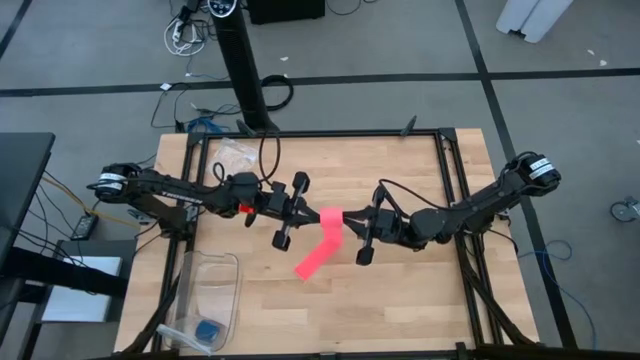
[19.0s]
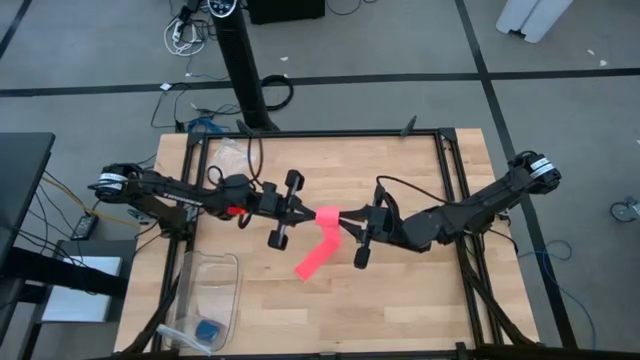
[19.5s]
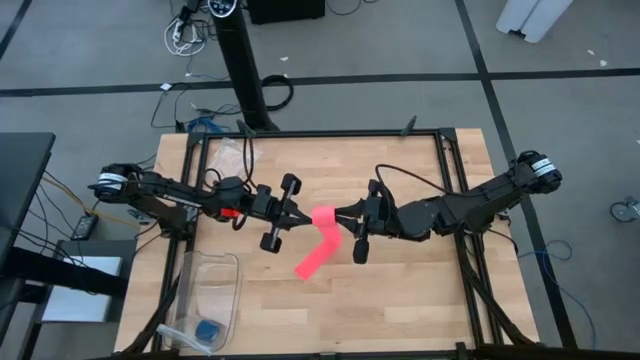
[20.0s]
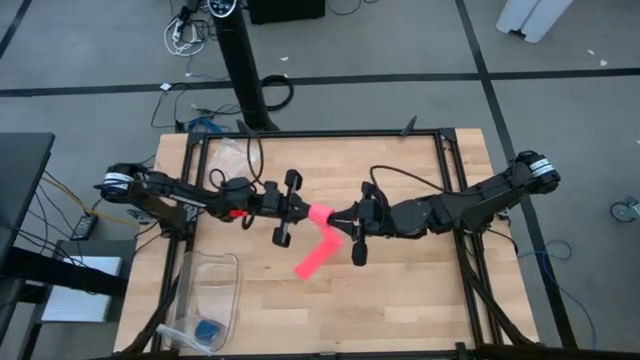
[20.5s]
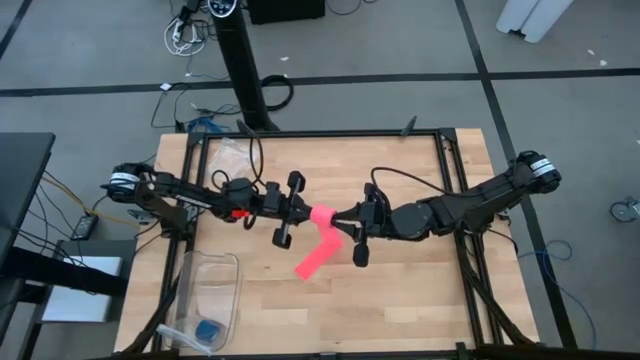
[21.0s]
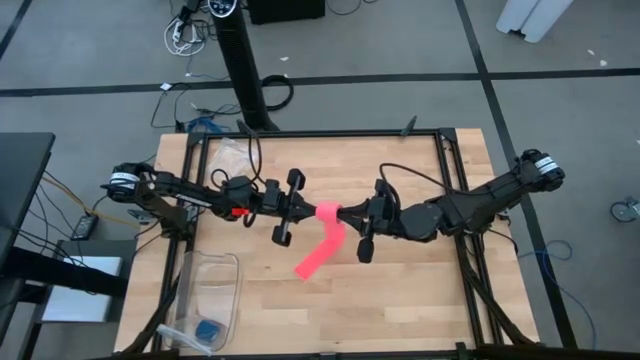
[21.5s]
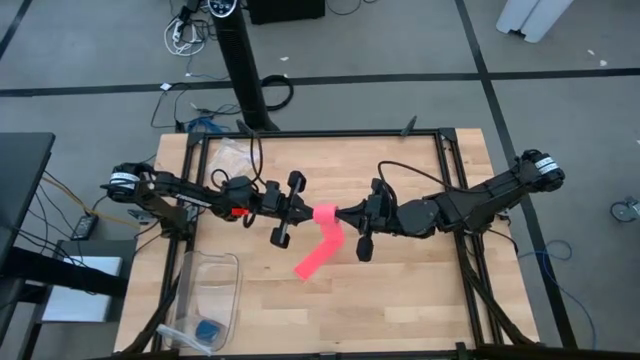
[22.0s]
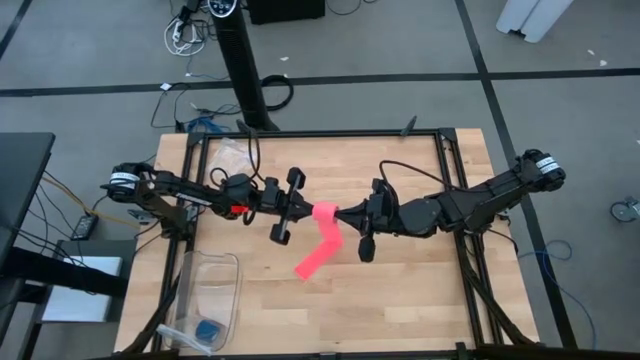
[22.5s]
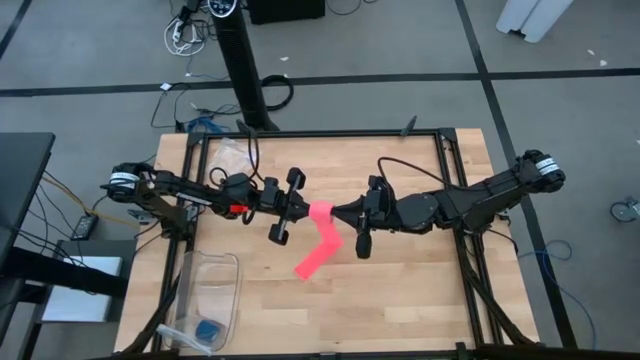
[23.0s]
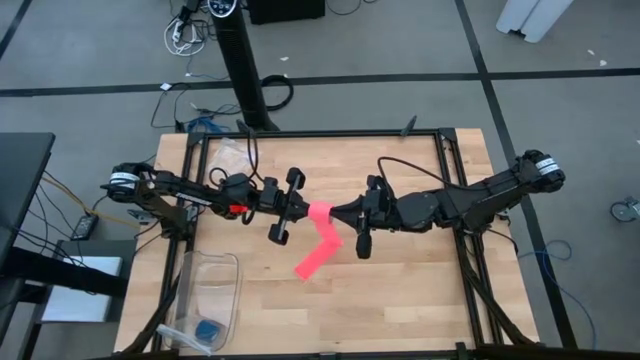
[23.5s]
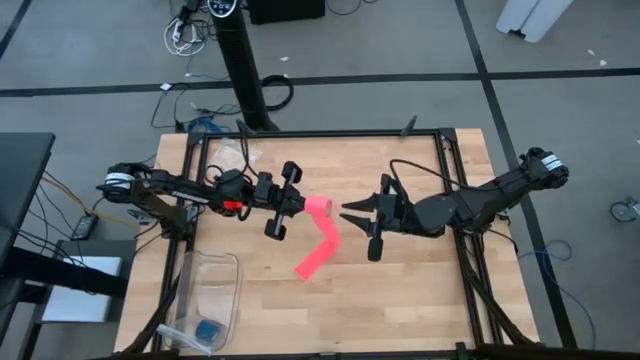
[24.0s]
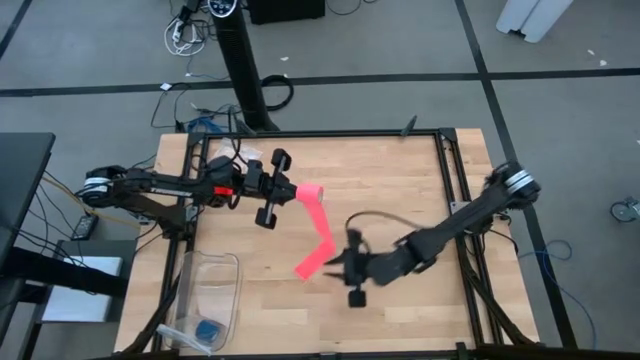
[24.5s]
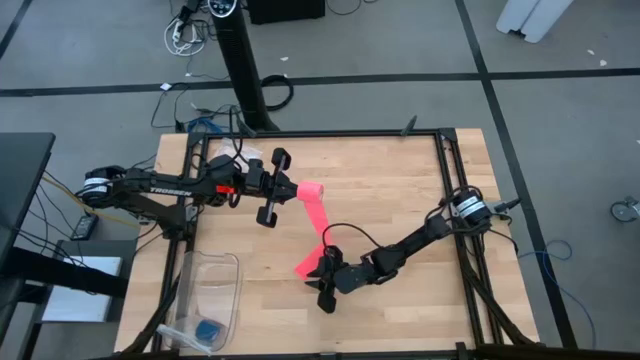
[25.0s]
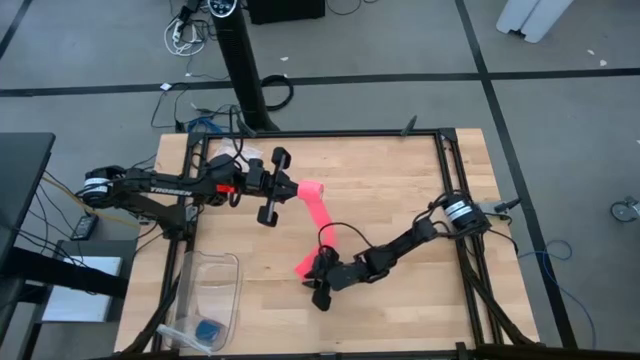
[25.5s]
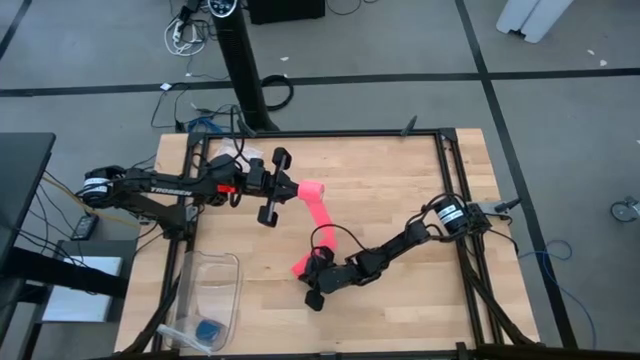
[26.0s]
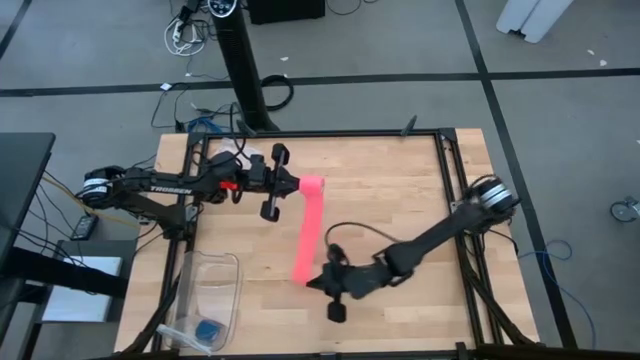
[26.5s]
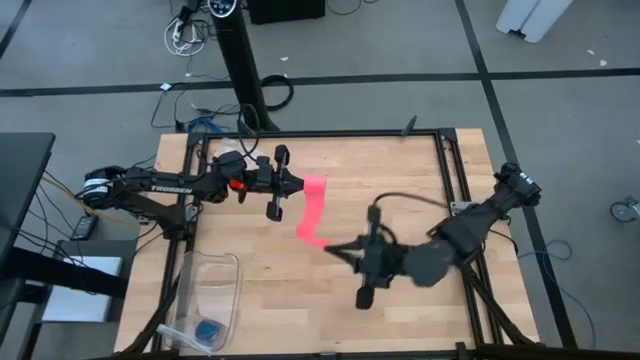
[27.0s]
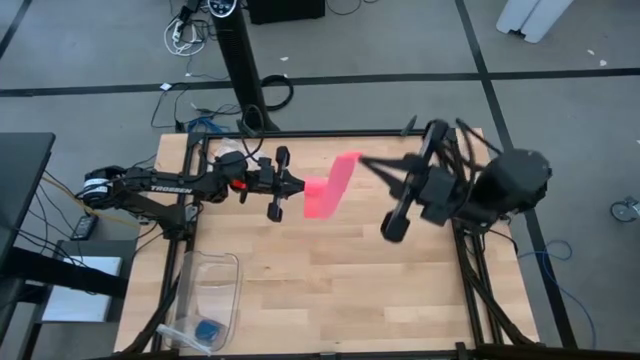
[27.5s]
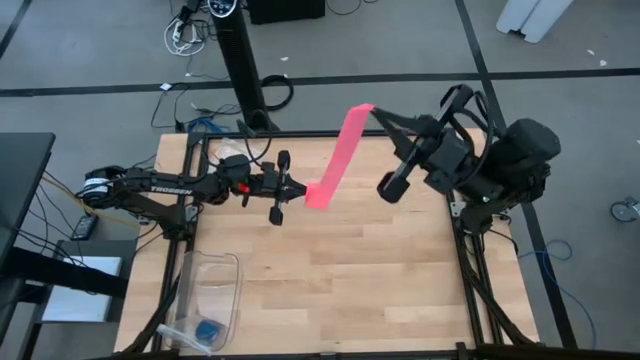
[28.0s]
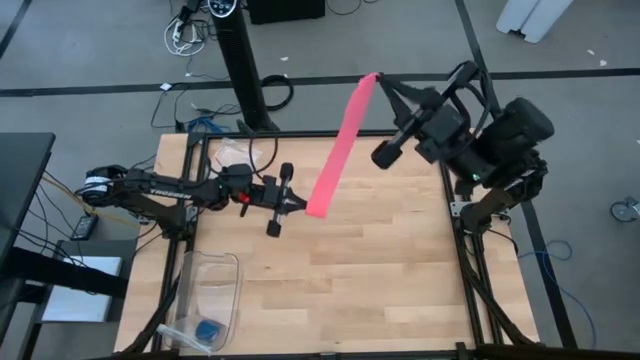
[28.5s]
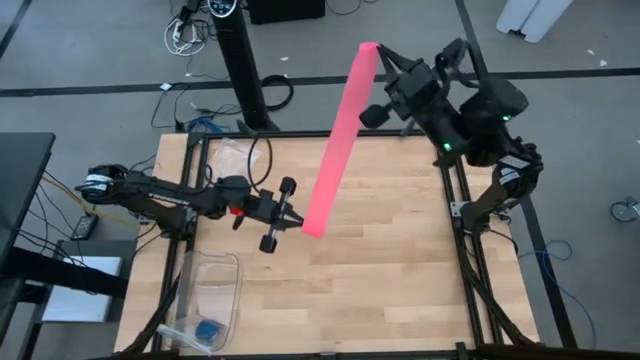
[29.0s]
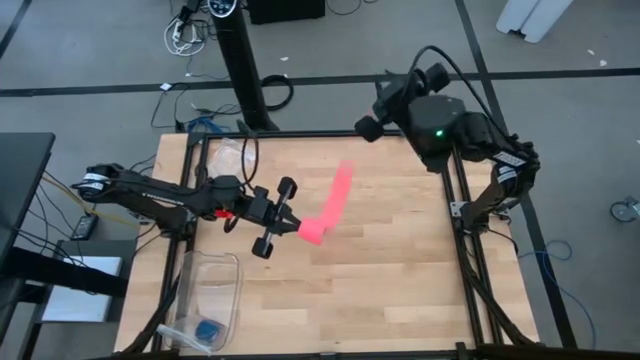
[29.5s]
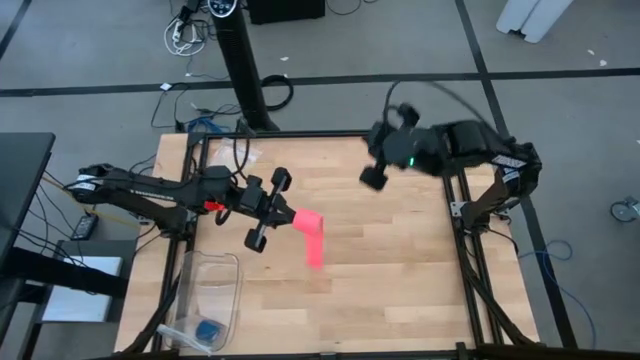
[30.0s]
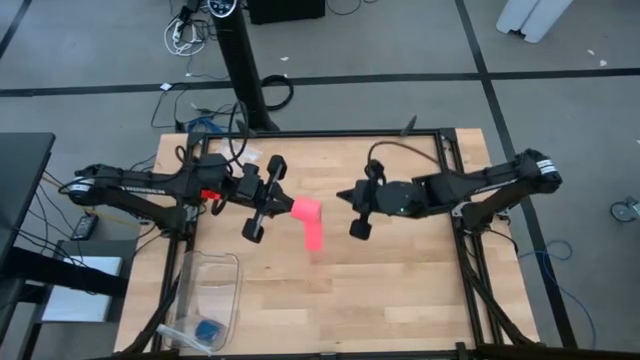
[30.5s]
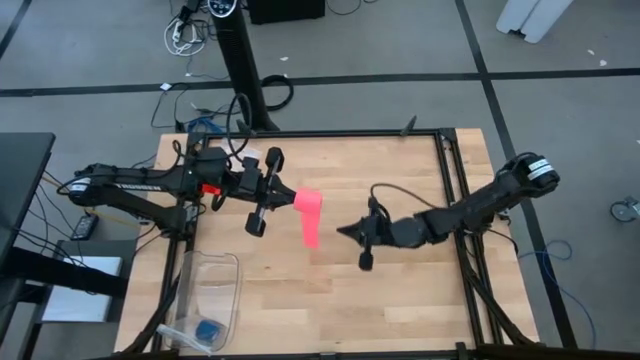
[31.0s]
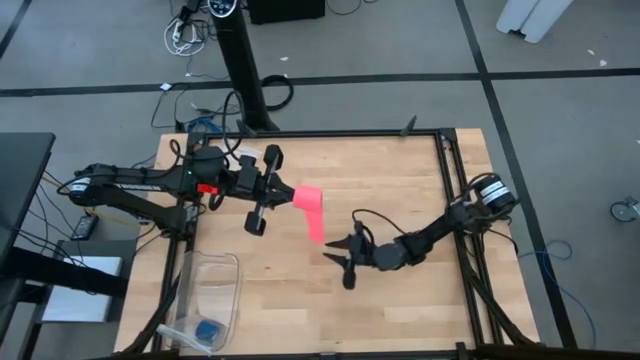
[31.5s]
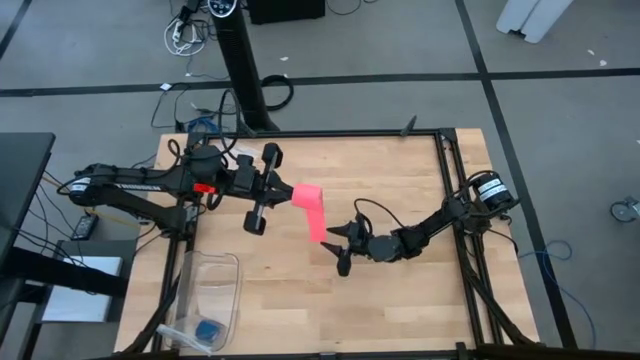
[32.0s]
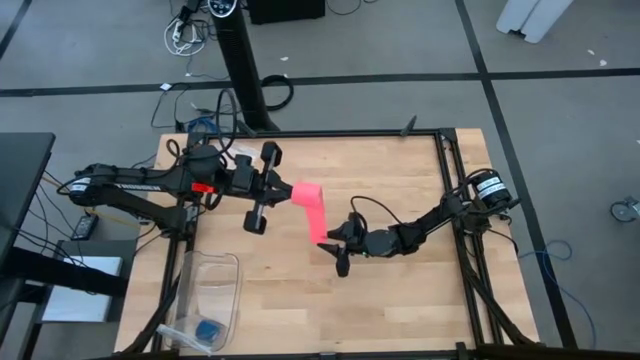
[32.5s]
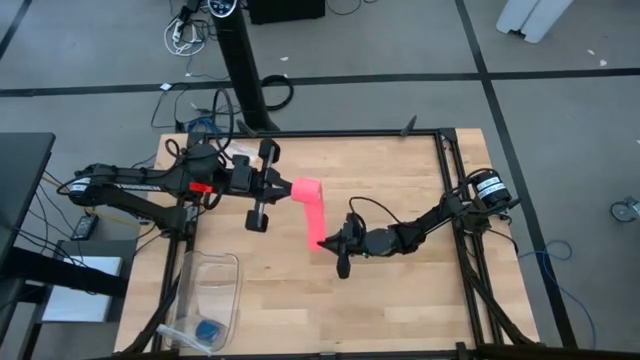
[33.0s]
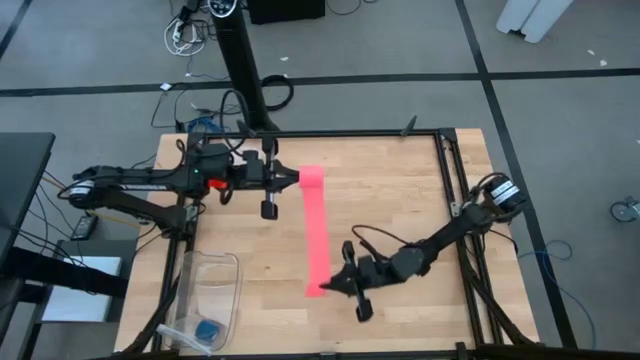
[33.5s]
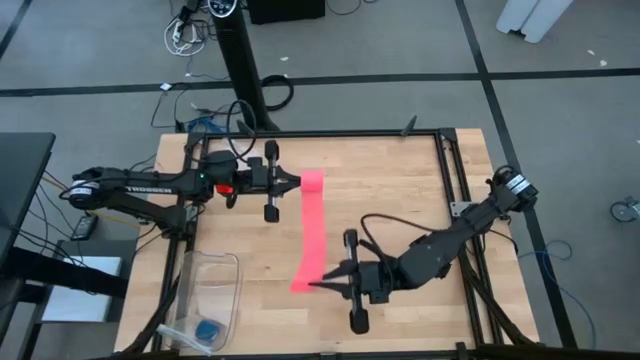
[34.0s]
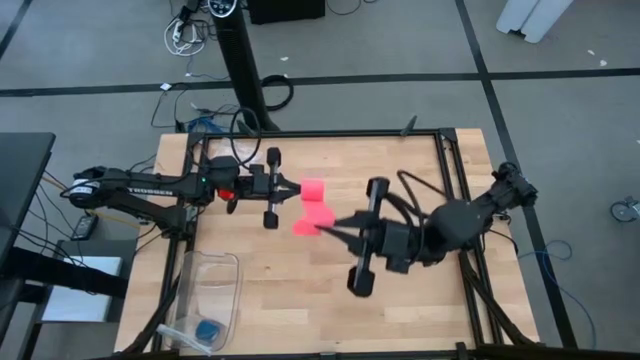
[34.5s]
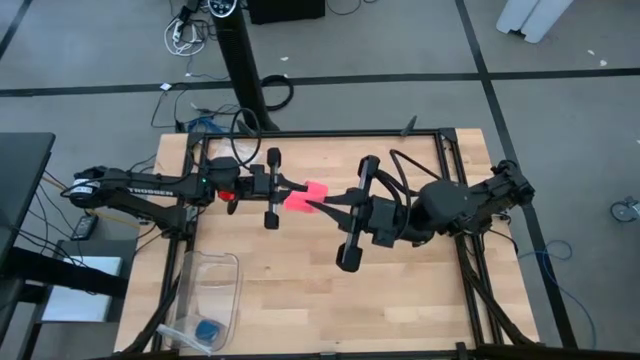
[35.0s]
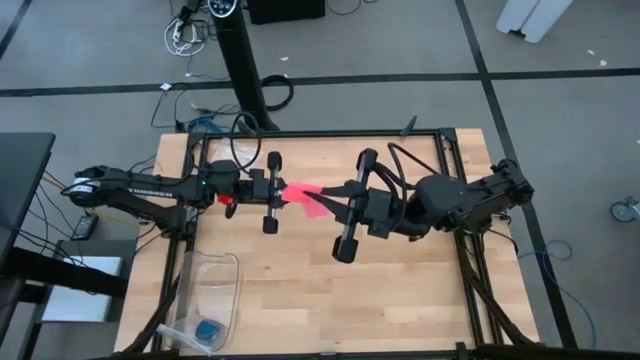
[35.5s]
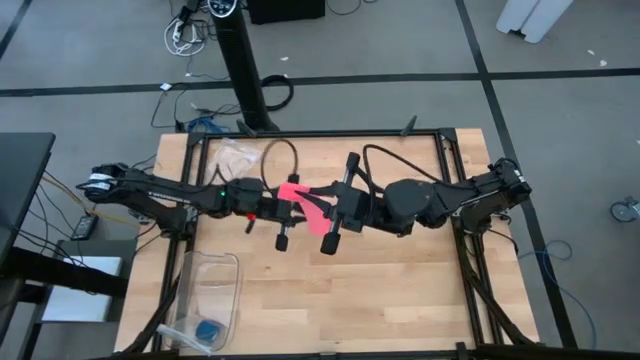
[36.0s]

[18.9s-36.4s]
Task: Roll bandage
Roll the pink bandage

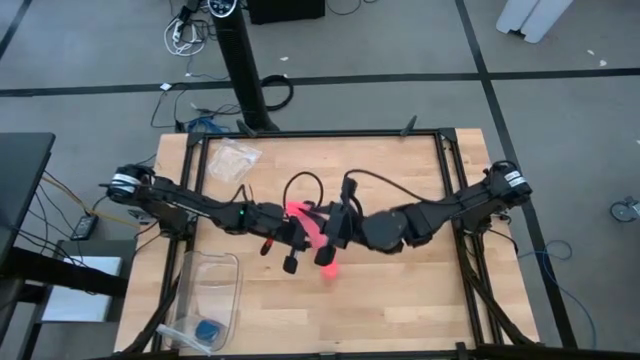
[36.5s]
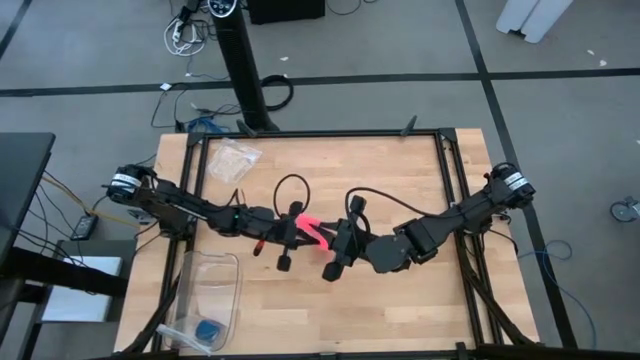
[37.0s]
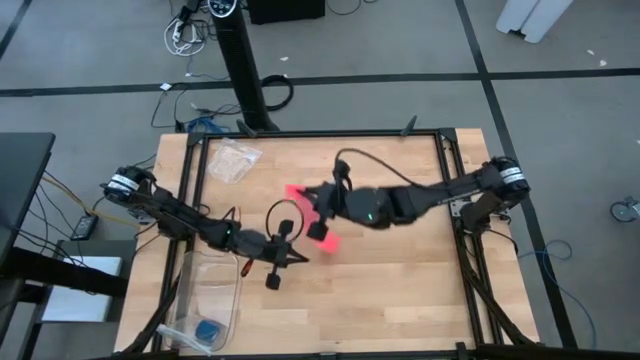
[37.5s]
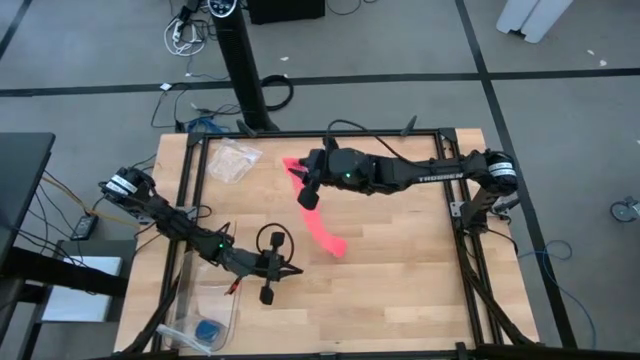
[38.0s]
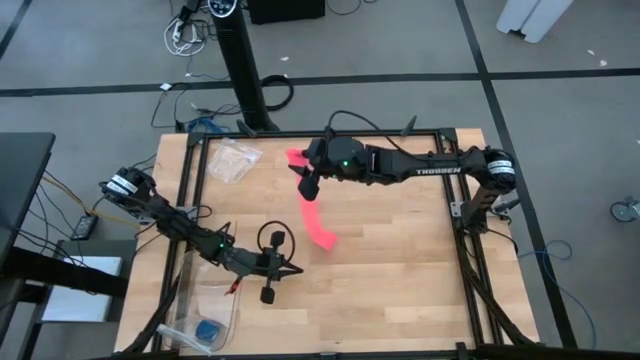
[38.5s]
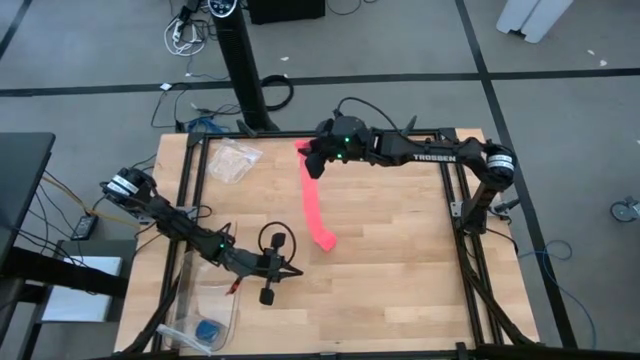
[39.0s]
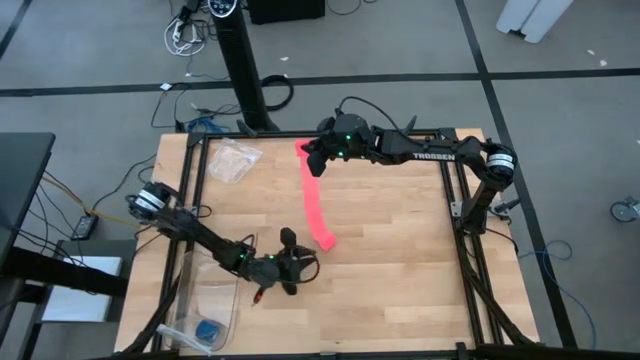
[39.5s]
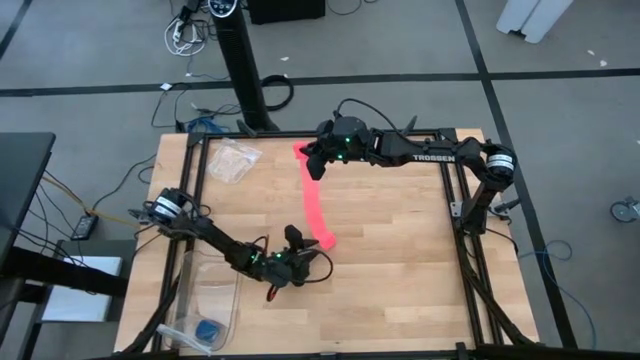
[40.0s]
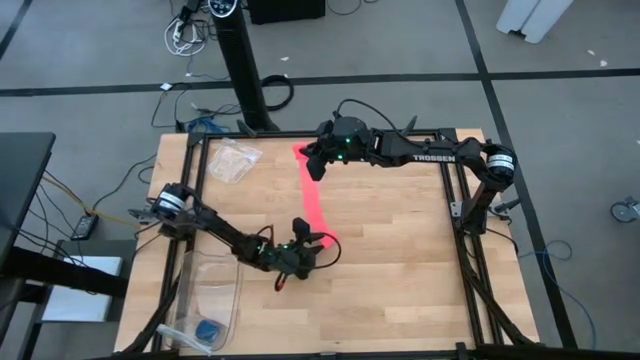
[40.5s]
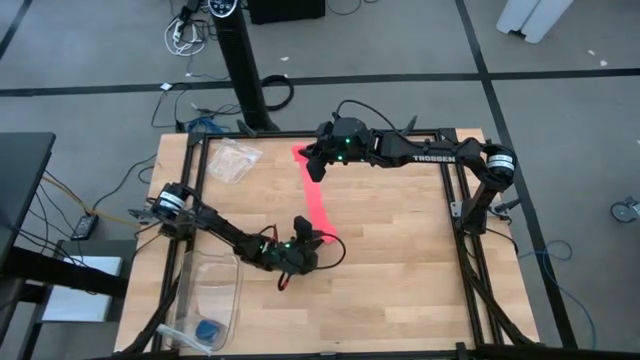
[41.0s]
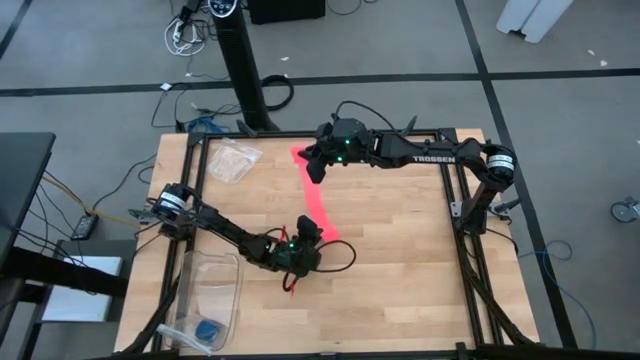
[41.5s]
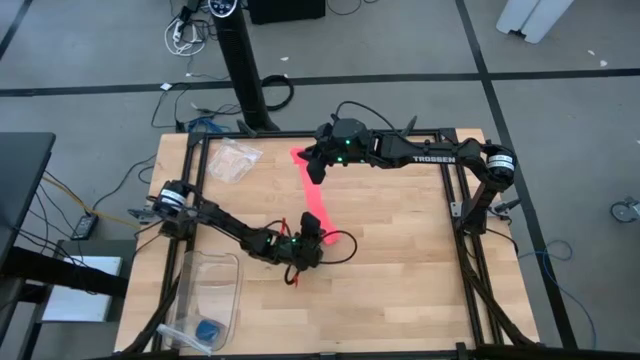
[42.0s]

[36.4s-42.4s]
Roll the pink bandage
